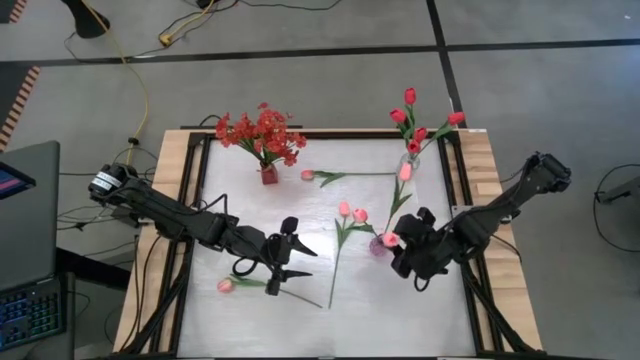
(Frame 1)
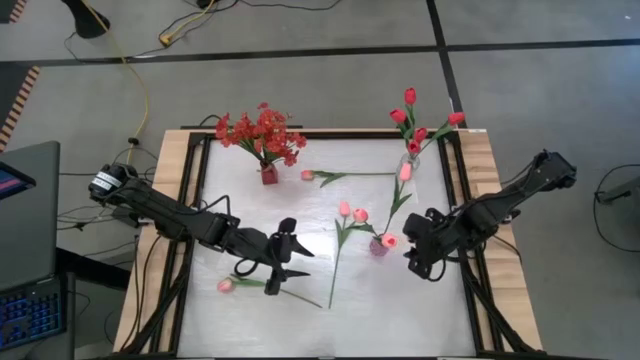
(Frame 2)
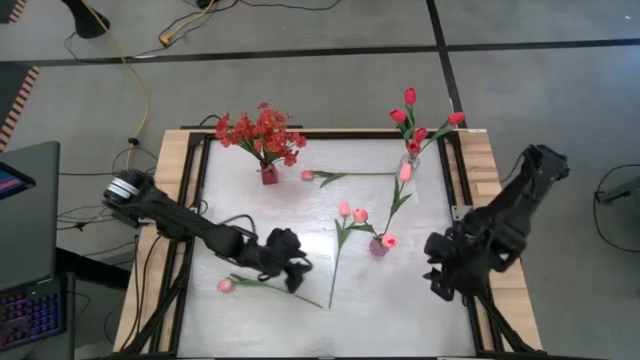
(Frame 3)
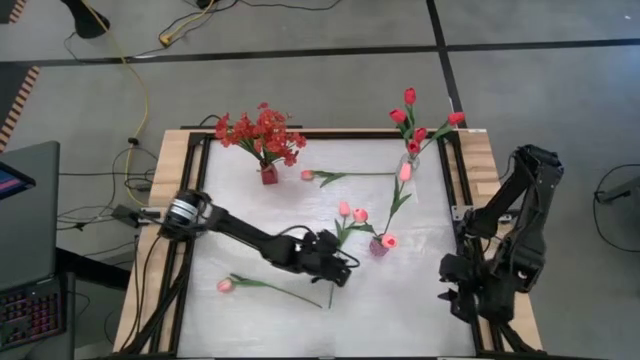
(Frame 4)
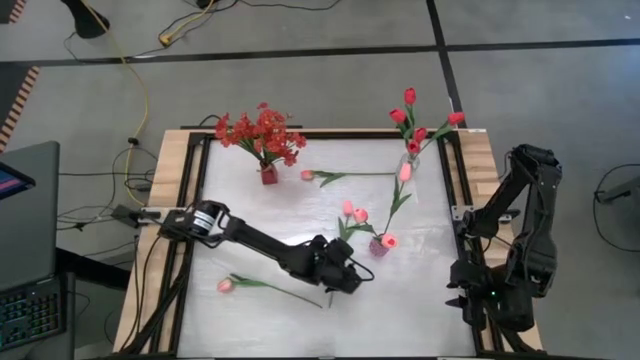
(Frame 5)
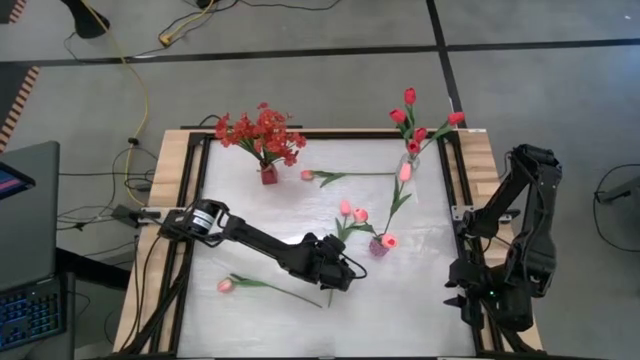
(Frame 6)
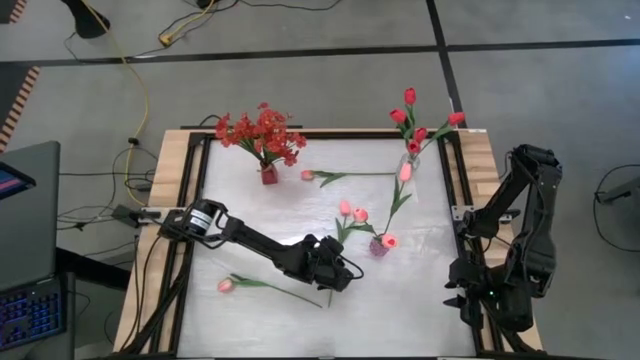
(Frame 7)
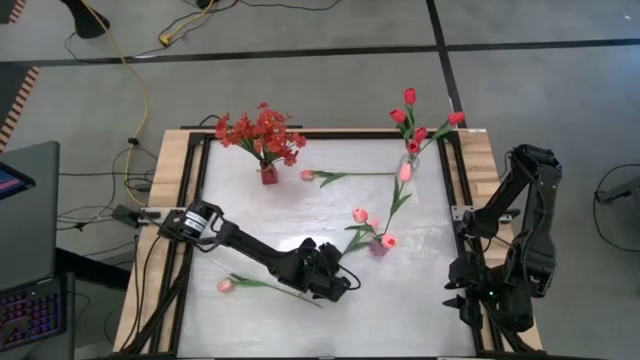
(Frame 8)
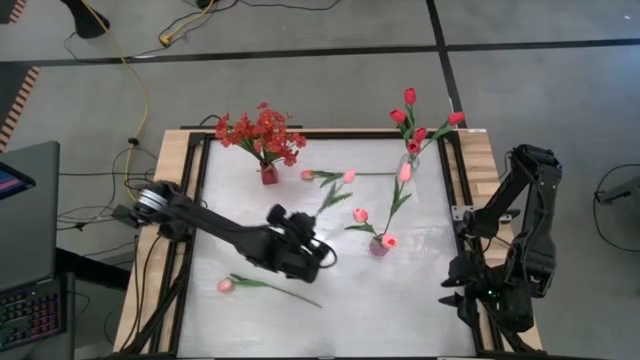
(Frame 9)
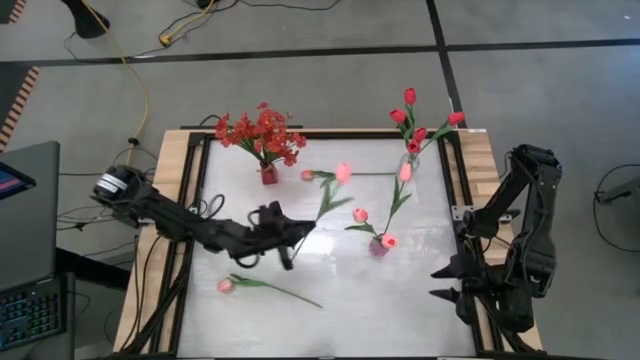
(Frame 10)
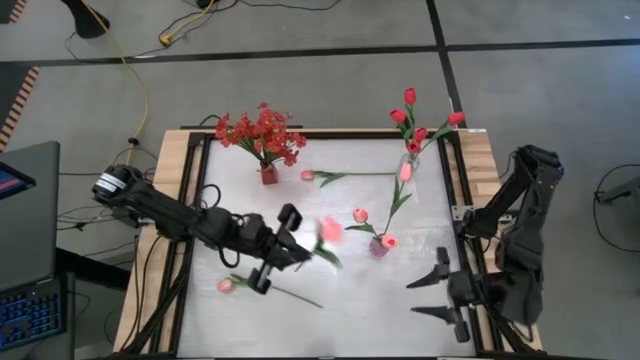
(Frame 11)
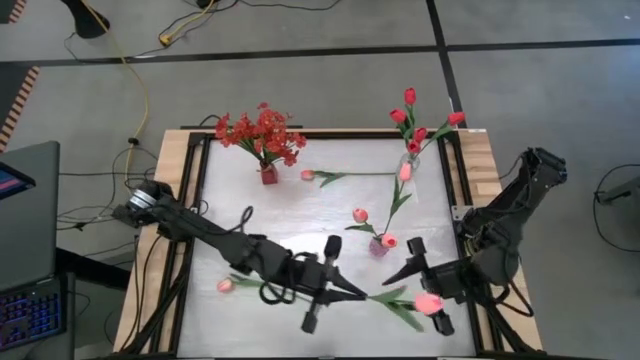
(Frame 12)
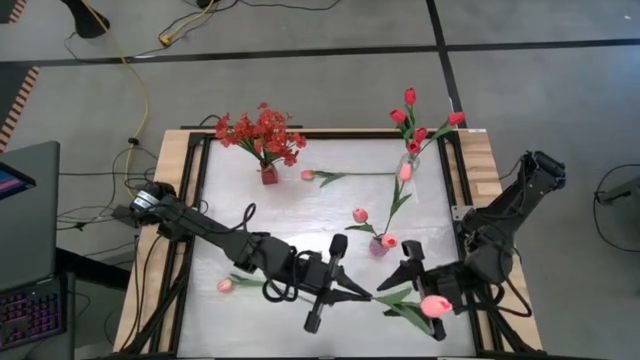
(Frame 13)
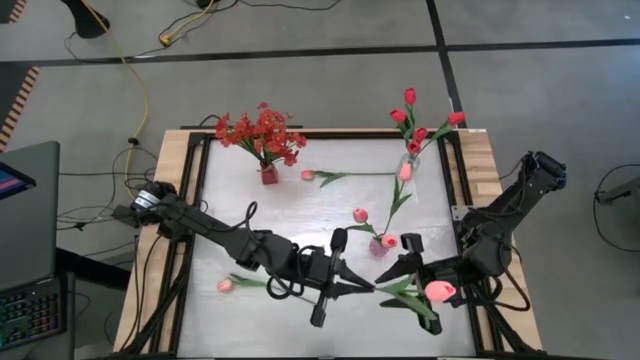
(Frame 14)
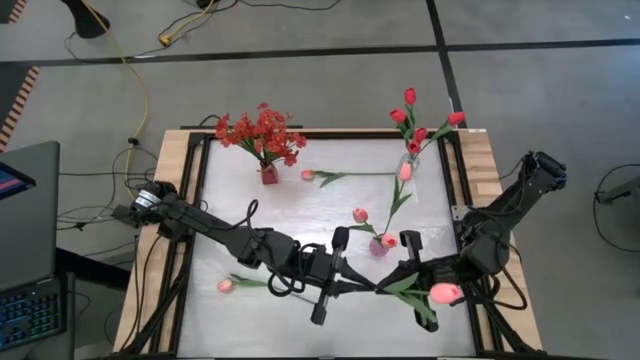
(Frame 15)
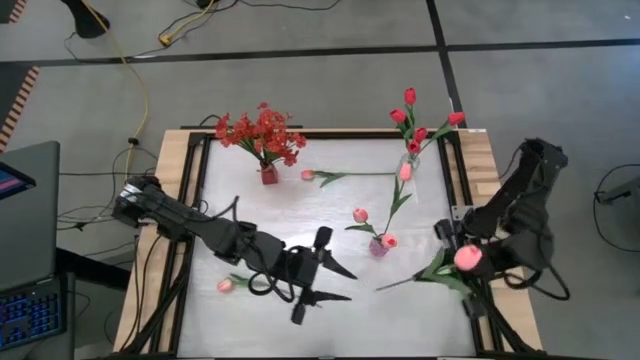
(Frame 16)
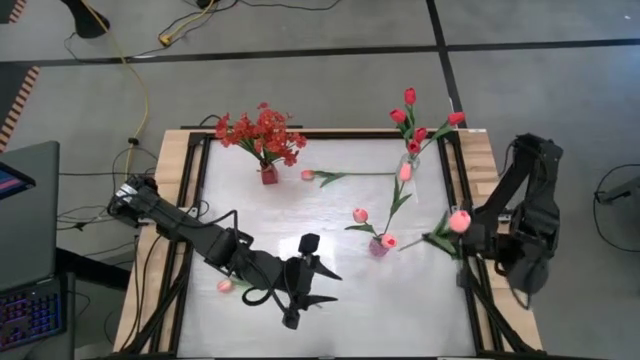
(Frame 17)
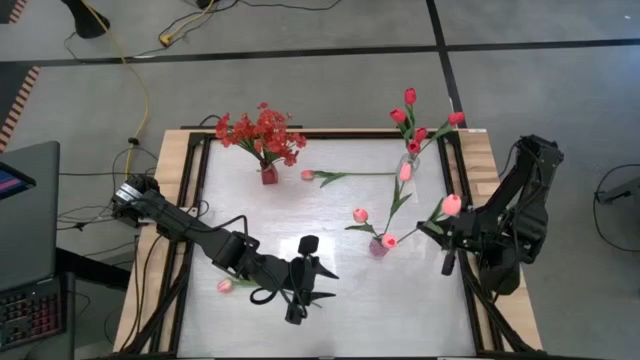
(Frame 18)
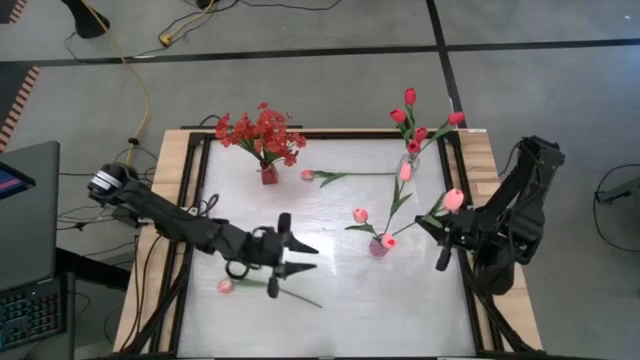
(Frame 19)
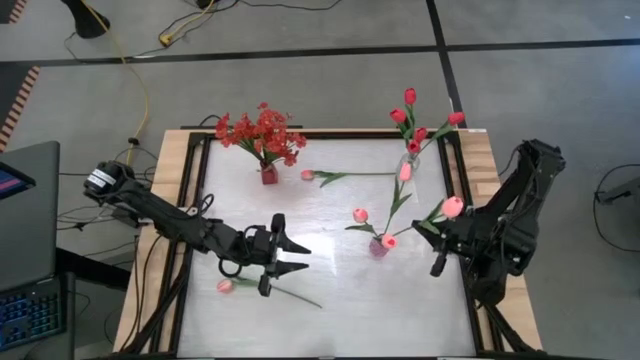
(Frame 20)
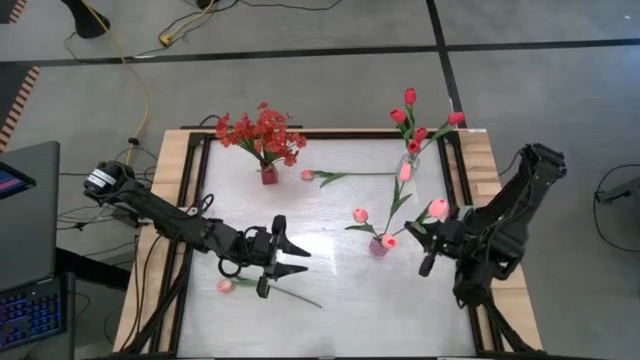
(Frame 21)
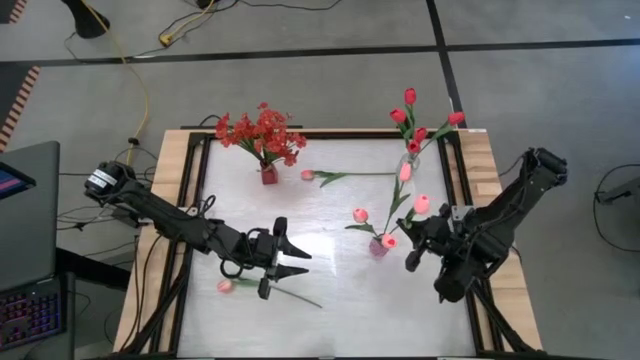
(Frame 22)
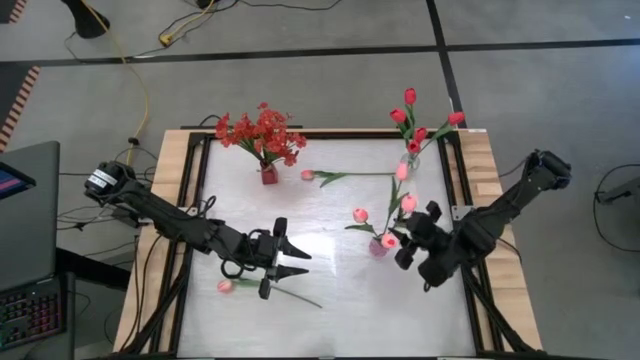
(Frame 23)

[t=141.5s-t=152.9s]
Task: Sort flowers into vase by color
Put the pink tulip into the purple flower vase

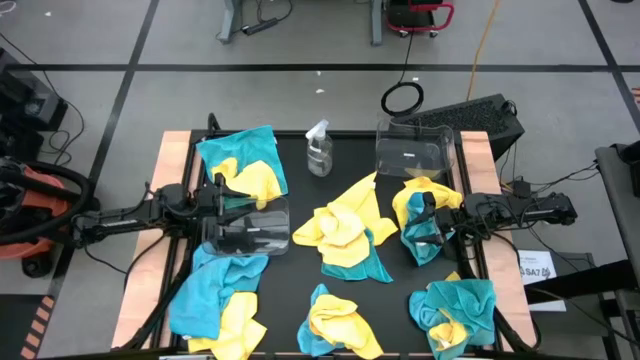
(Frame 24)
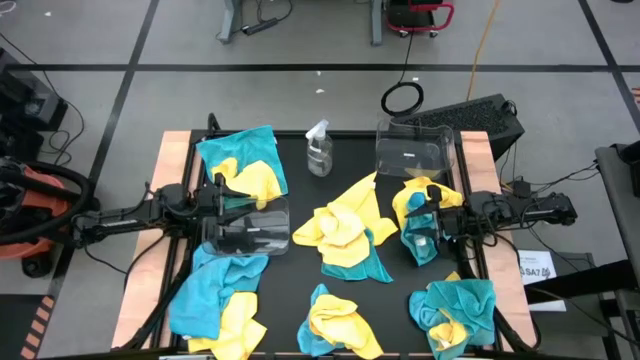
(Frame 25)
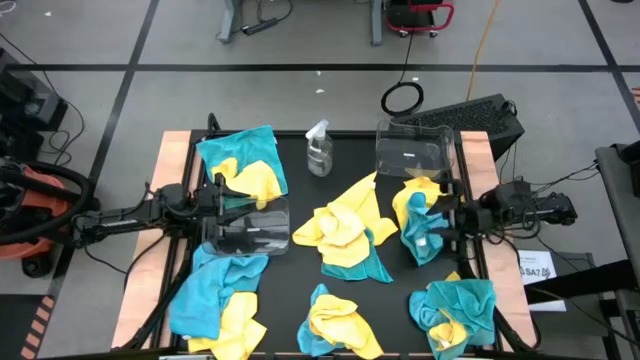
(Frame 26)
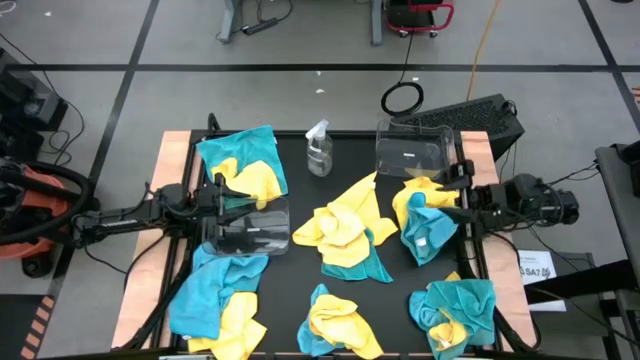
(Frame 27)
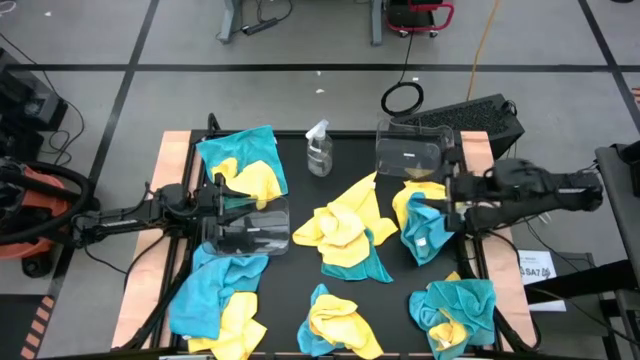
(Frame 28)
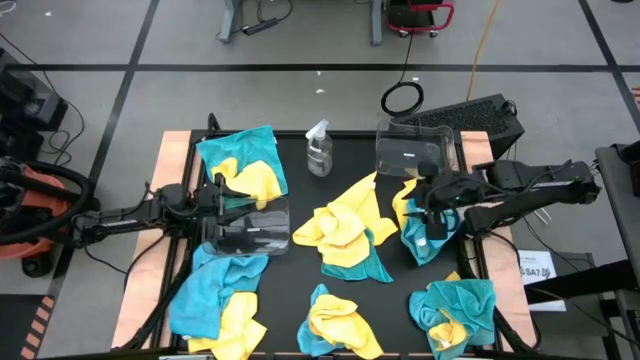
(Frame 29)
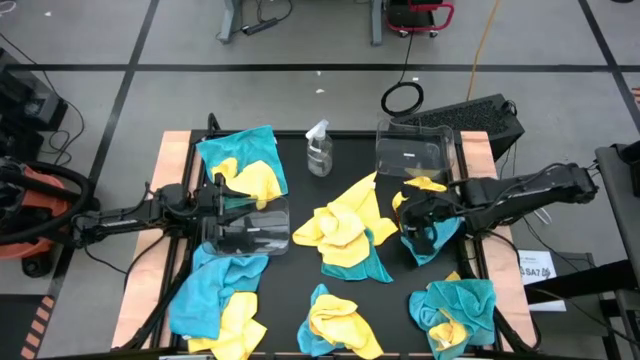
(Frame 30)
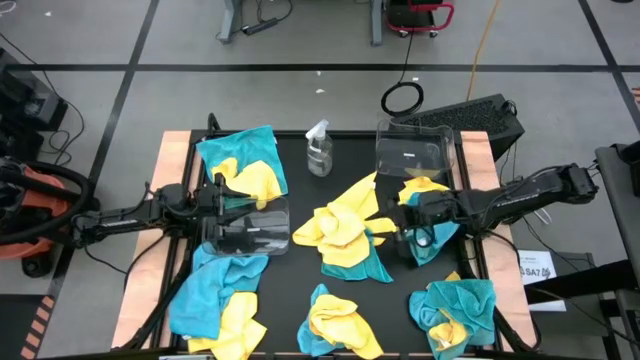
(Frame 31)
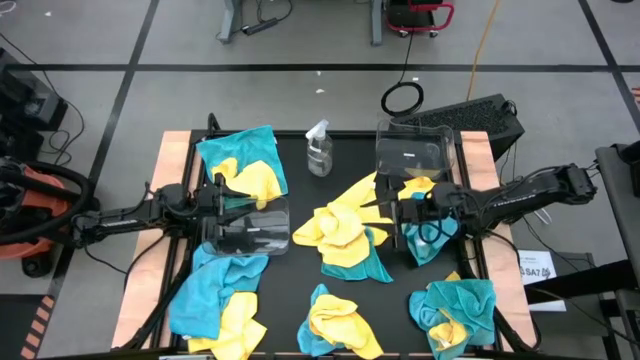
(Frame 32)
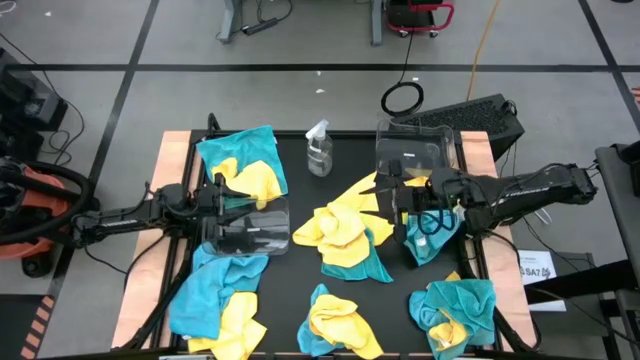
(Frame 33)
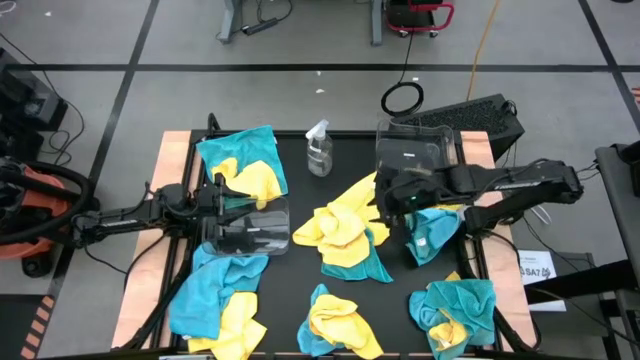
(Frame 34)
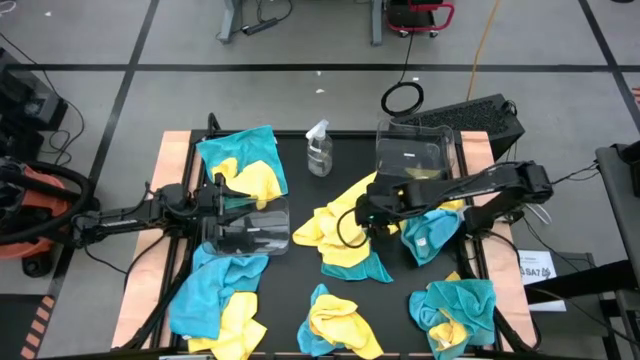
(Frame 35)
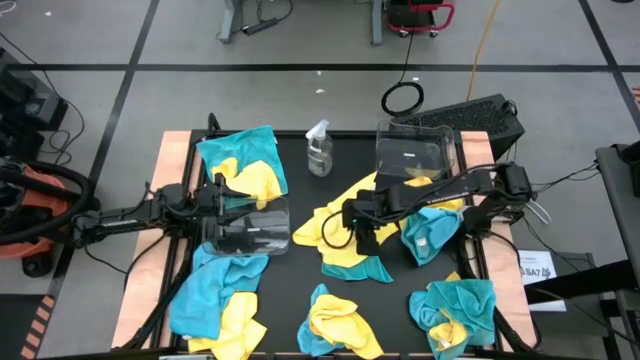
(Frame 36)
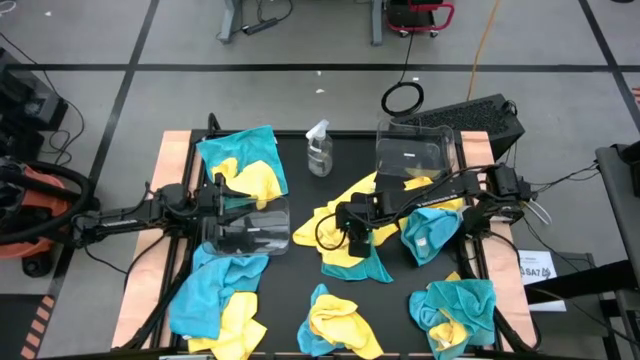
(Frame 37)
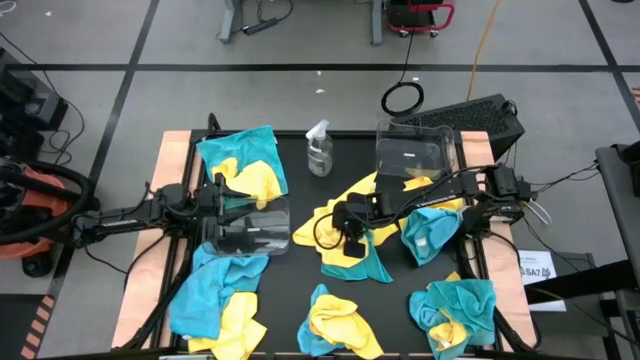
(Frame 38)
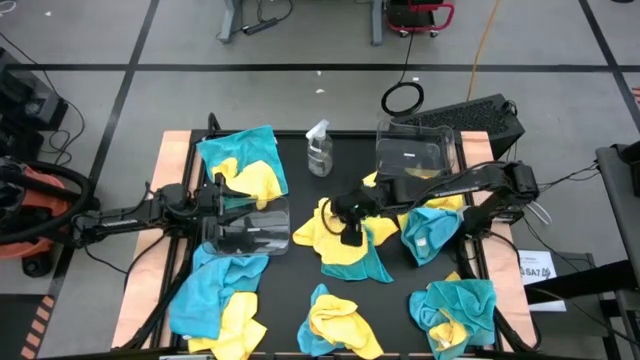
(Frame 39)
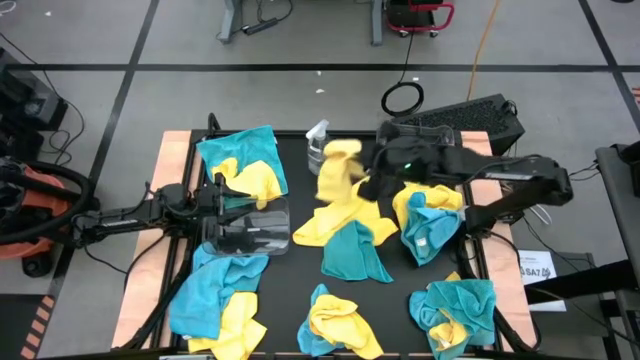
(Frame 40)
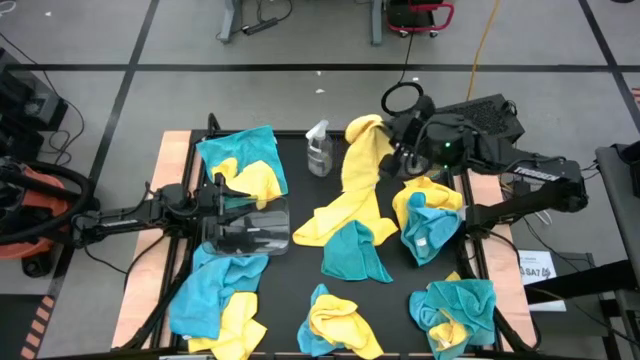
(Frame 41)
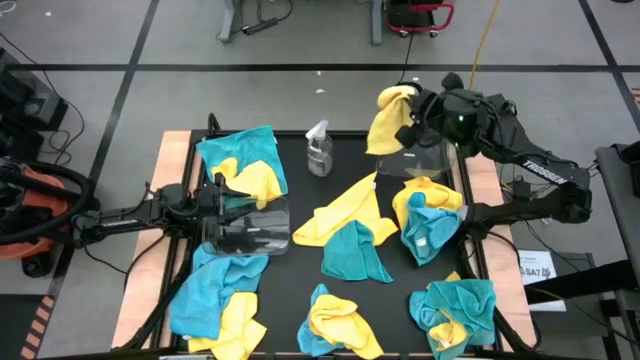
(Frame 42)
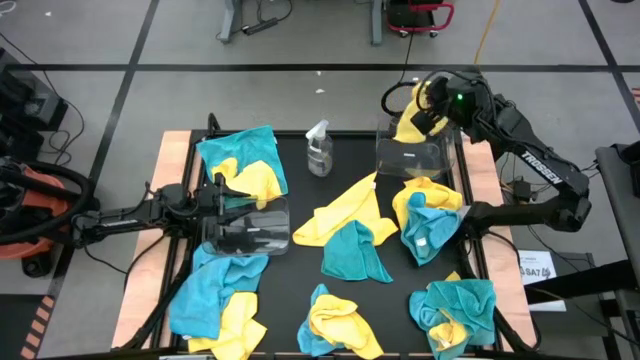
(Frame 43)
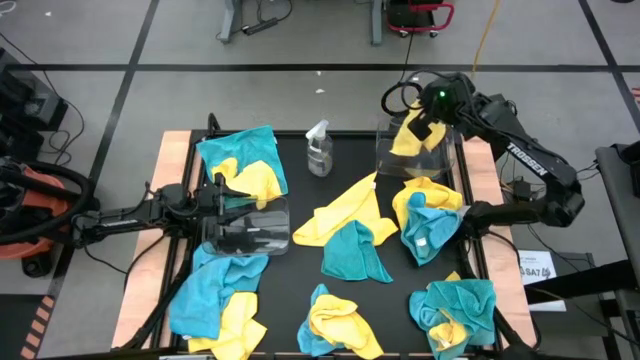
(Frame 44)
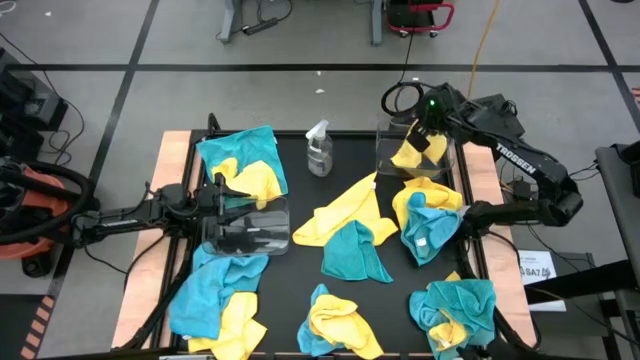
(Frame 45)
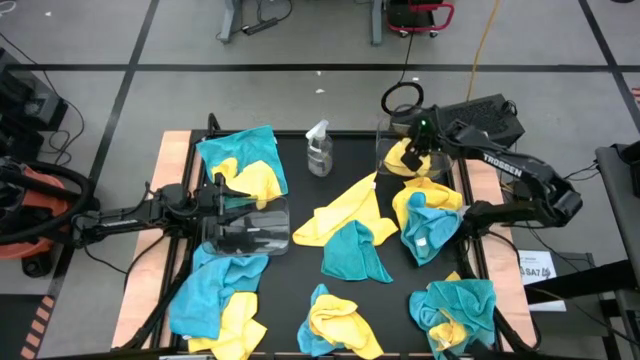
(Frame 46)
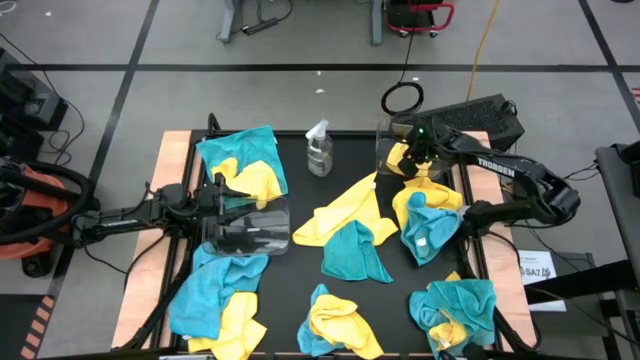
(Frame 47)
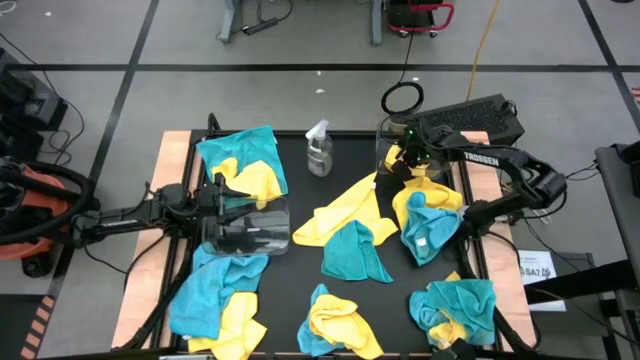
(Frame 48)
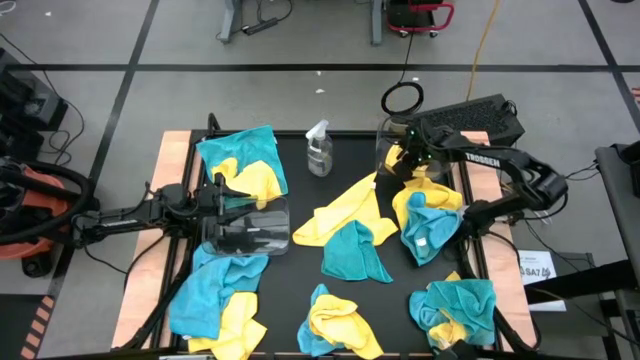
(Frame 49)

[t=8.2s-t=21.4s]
Task: Sort microfiber towel by color & place in baskets
Put the yellow towel into the top transparent bin
